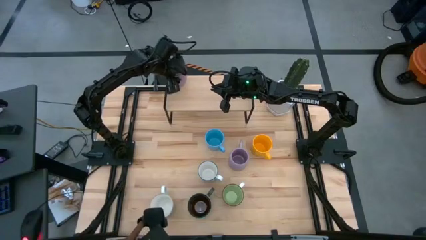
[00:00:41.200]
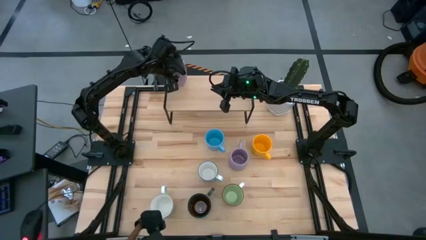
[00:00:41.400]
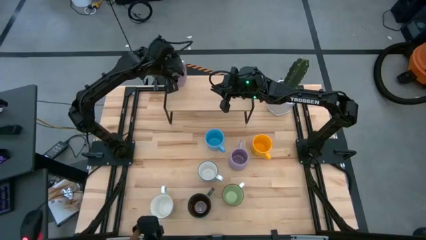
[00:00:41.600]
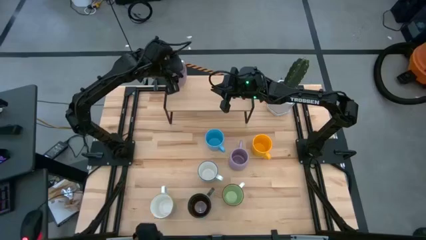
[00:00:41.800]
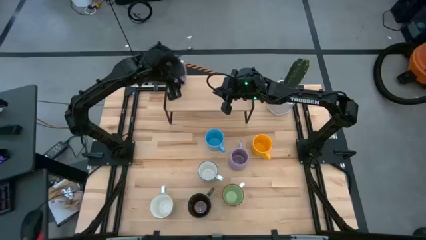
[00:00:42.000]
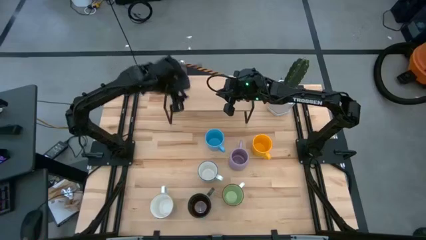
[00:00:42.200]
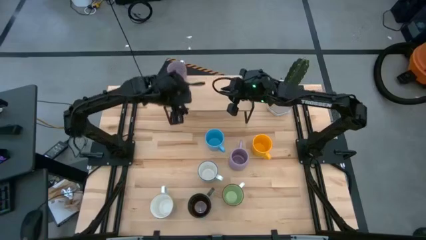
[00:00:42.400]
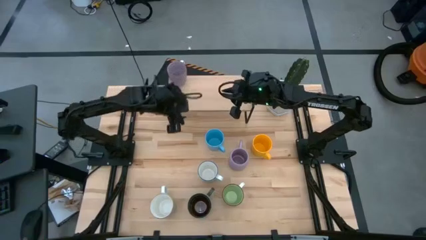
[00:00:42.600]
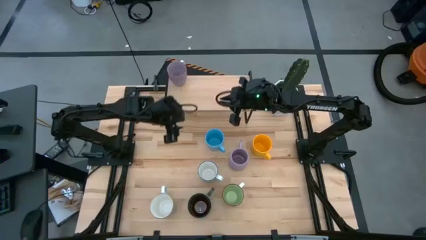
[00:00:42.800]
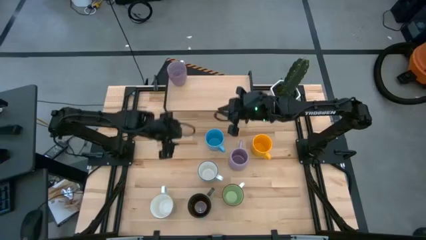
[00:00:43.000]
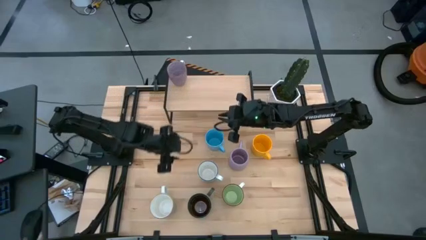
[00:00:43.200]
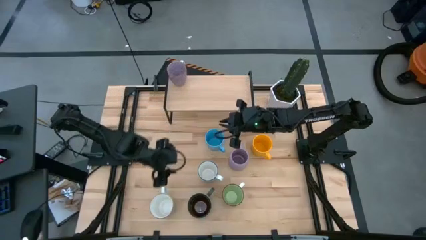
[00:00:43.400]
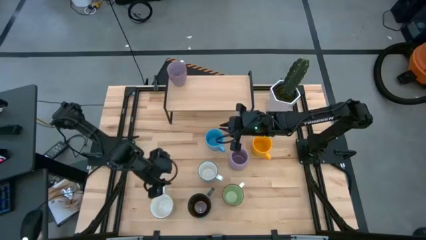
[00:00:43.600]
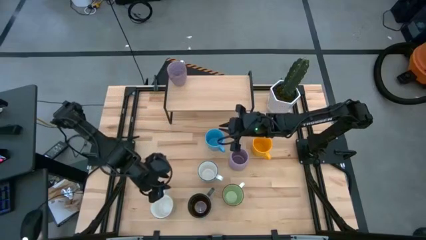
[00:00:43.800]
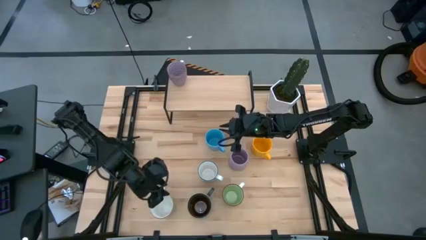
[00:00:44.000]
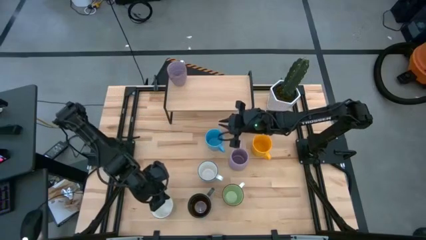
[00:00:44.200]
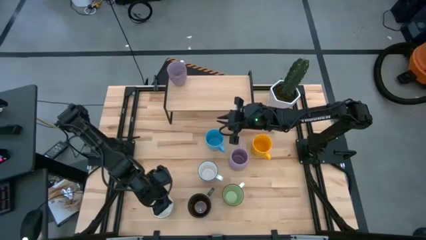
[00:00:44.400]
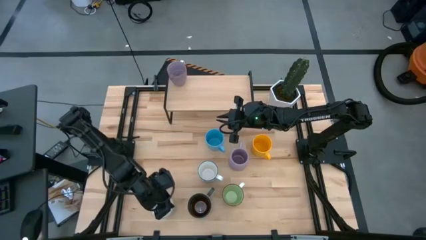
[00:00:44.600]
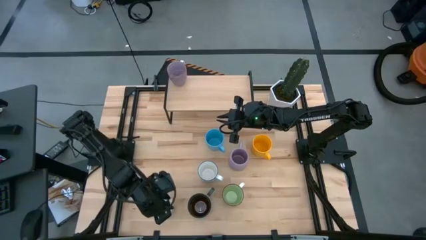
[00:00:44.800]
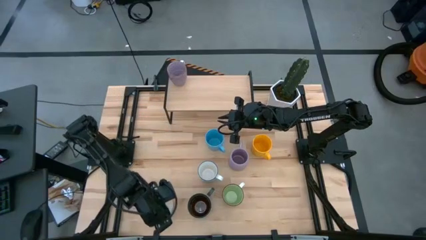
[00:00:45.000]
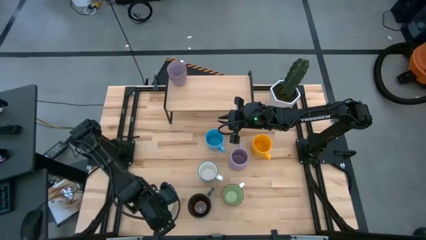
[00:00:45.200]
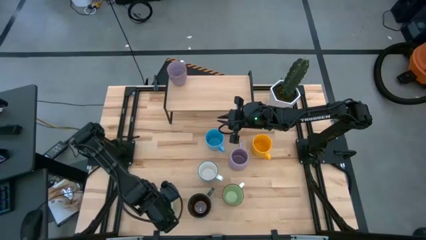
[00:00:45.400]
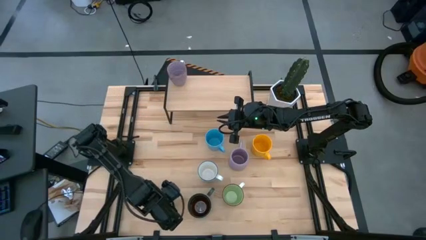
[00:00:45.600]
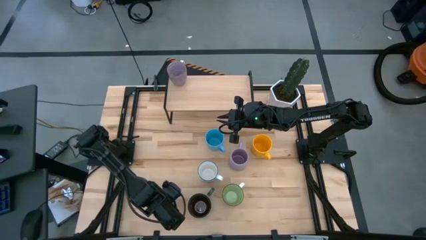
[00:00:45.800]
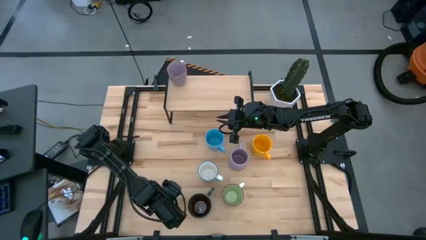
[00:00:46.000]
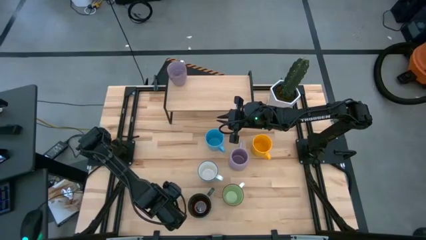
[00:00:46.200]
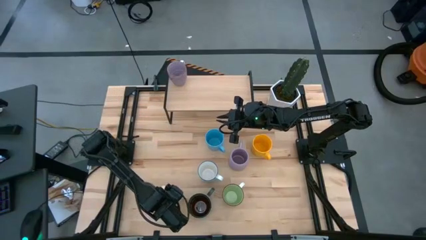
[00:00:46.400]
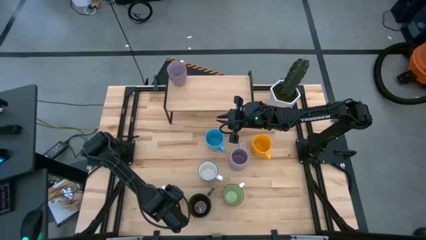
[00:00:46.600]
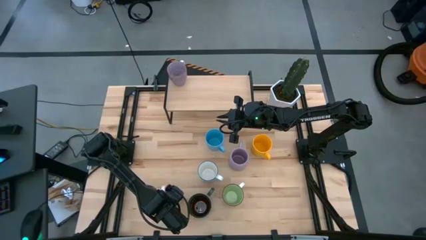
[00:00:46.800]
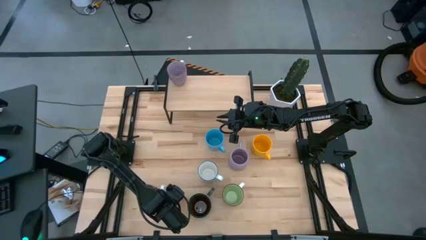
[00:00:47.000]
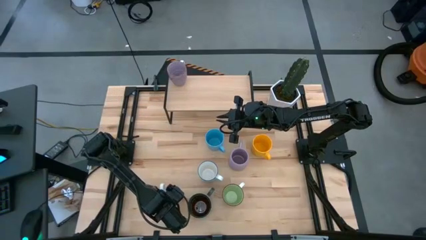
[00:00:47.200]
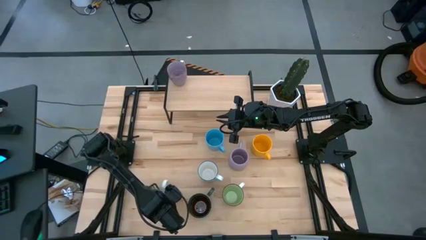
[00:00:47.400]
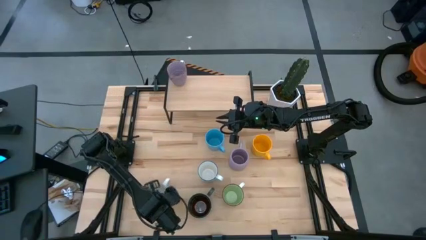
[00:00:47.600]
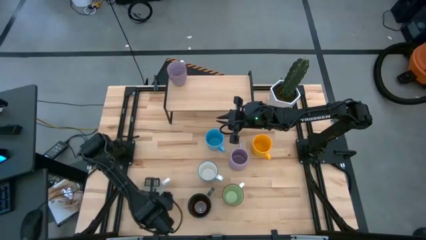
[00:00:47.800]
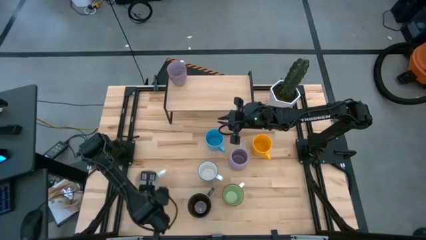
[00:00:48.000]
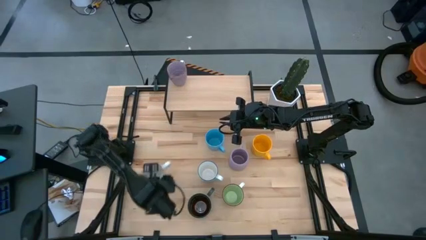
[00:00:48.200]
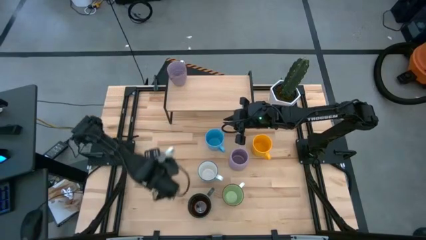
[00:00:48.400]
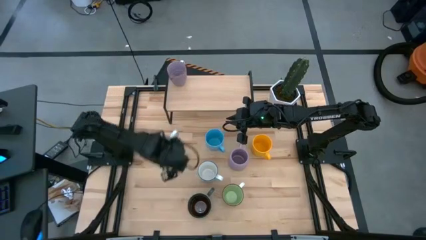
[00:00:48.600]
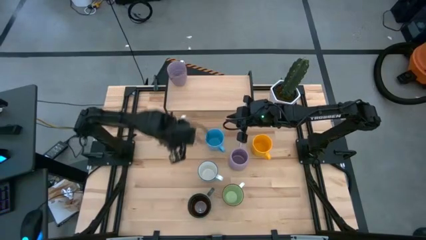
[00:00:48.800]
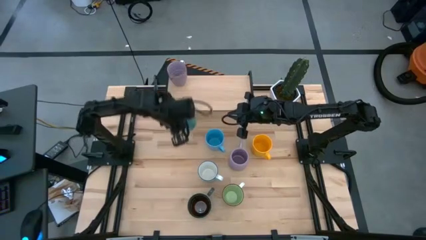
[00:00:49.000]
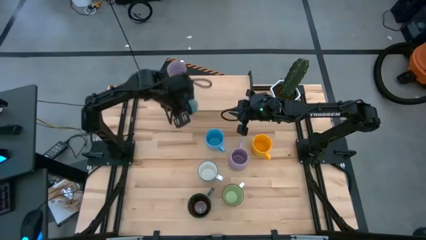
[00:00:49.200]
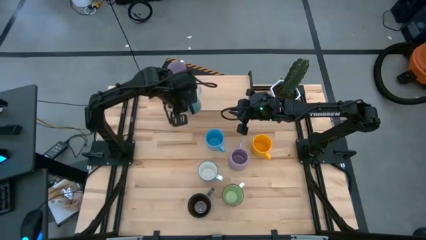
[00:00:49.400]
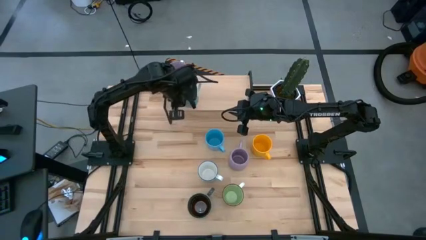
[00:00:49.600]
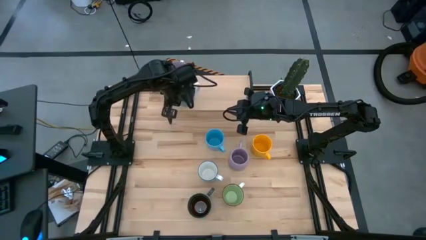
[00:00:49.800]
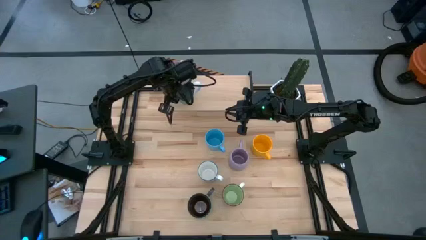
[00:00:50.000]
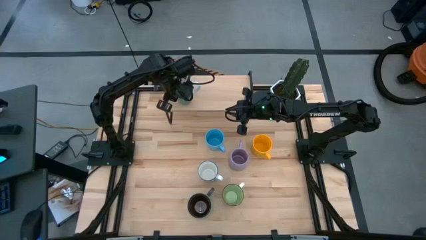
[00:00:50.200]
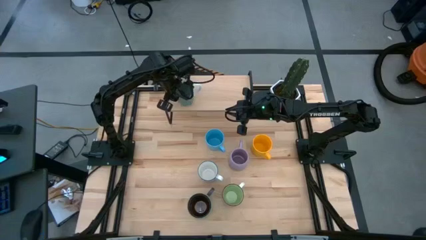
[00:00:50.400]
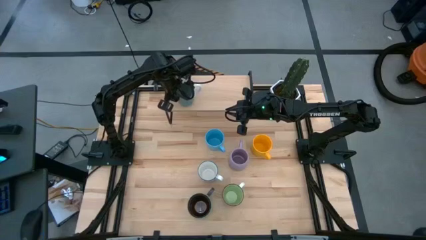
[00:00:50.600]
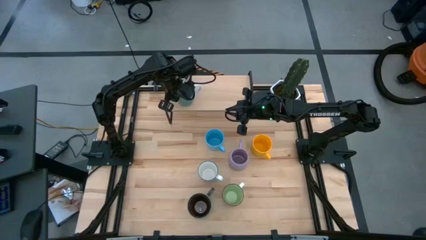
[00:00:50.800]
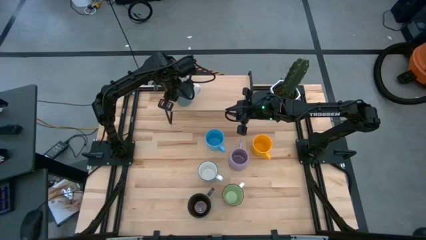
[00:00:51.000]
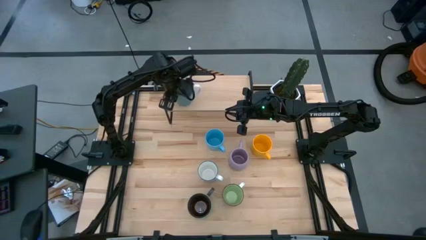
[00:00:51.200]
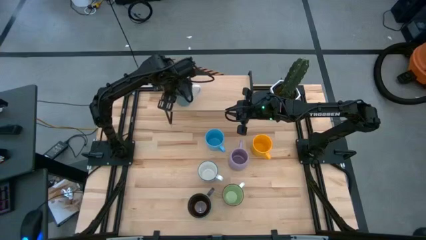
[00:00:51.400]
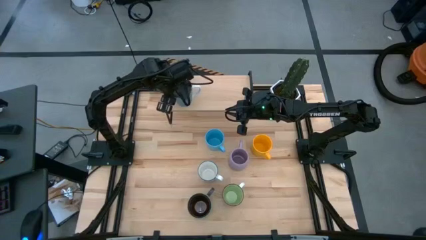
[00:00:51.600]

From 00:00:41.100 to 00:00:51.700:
Task: Place coffee mugs
Put the dark green mug on the shelf

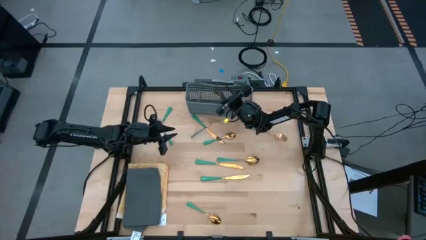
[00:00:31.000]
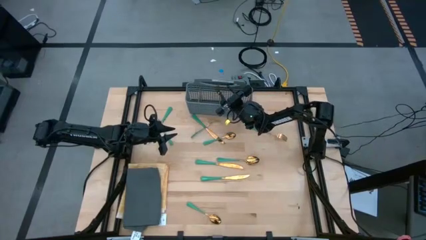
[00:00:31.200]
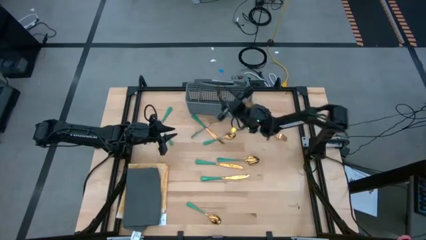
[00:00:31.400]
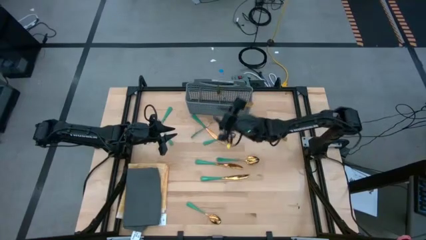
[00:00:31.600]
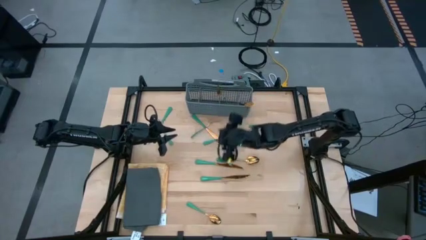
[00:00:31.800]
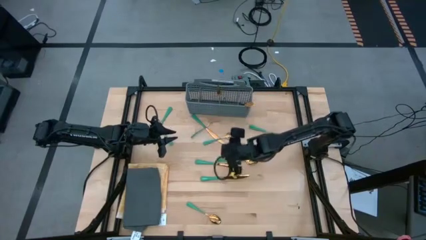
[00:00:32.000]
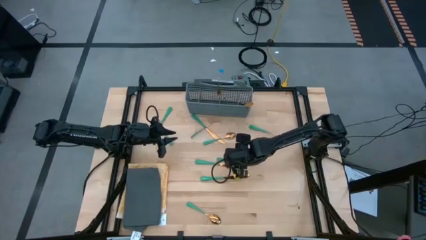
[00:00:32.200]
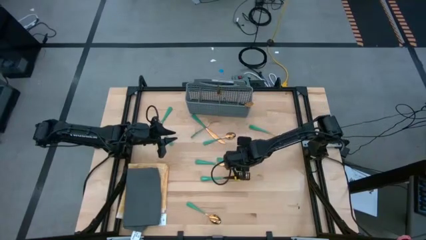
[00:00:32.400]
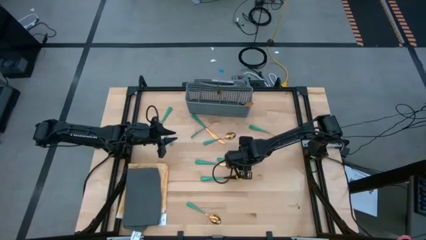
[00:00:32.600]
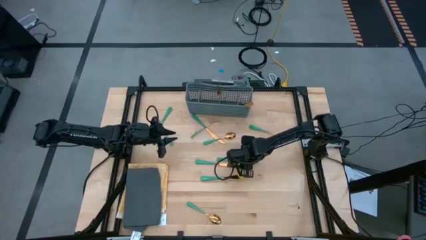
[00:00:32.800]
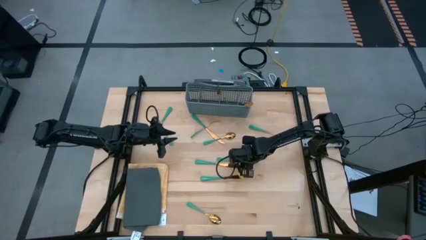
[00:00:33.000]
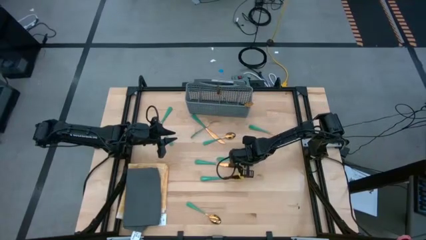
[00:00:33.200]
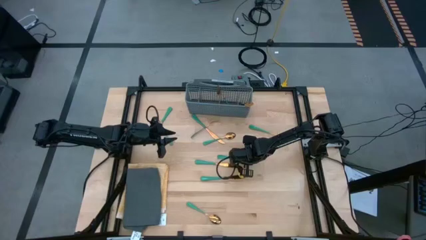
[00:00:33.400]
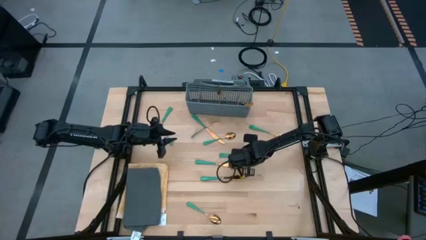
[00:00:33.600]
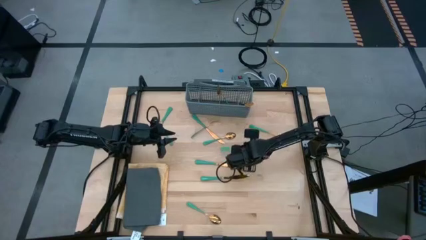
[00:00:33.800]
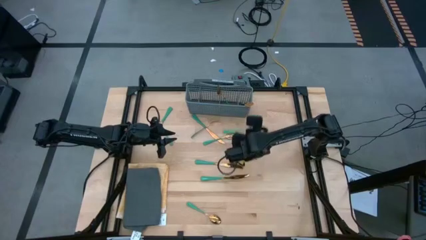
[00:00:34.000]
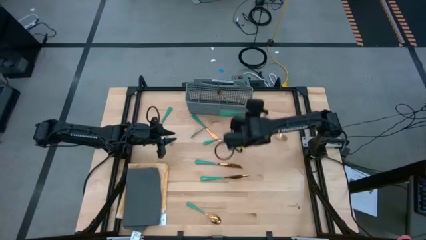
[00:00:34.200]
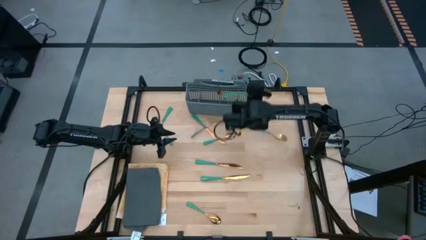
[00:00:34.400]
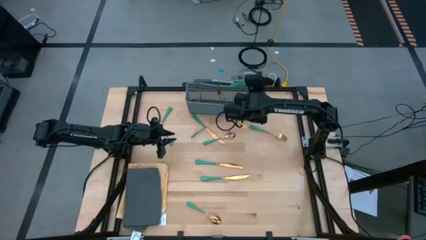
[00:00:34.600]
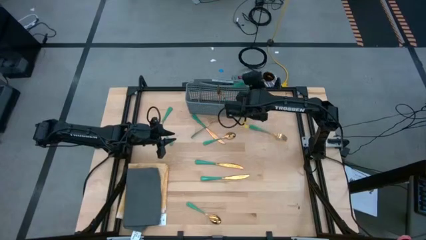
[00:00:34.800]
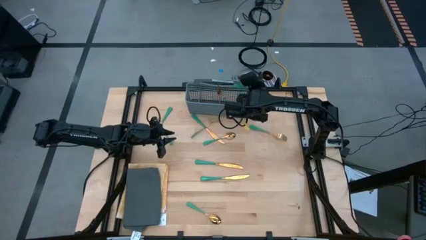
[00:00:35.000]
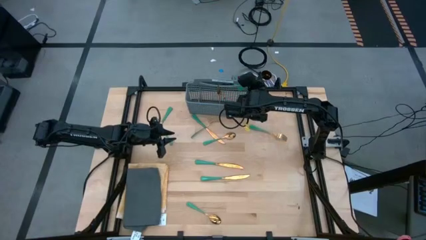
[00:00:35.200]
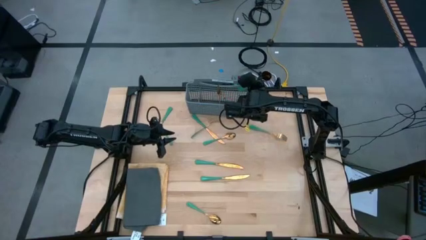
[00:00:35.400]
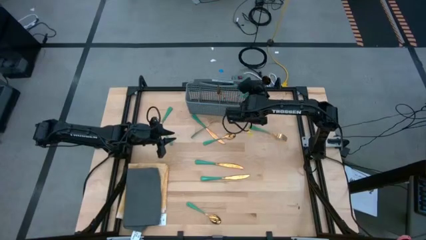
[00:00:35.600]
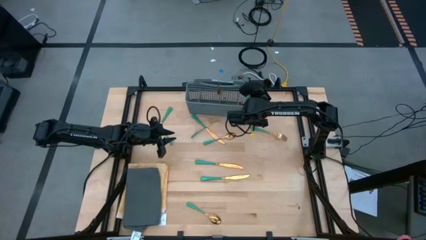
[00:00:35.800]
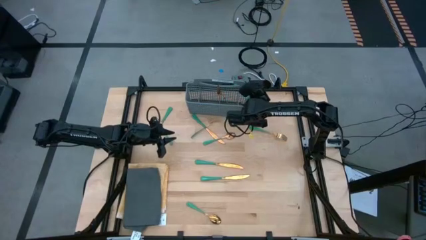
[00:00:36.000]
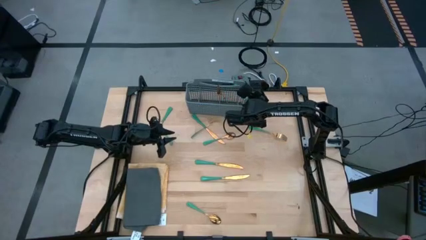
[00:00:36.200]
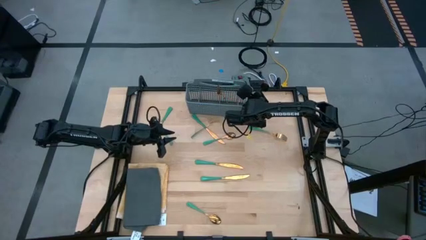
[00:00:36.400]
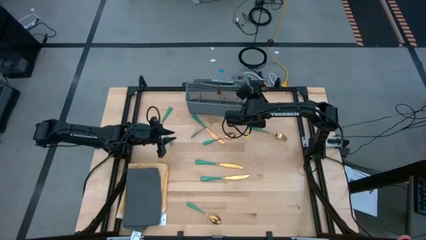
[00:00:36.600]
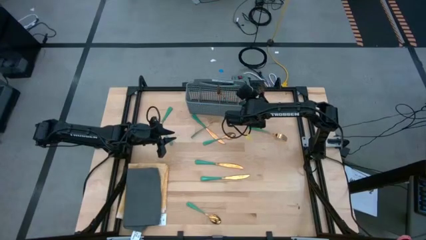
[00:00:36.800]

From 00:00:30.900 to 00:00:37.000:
Task: Sort silverware
Put the green spoon into the dishwasher utensil holder
